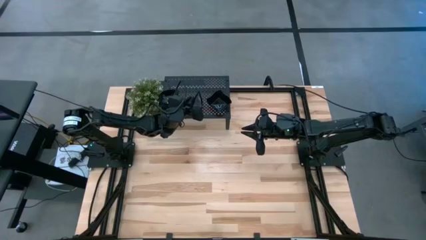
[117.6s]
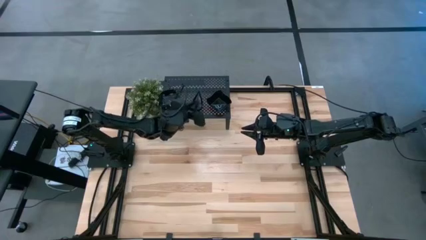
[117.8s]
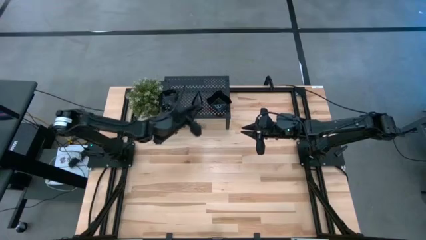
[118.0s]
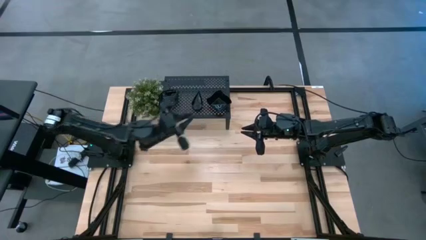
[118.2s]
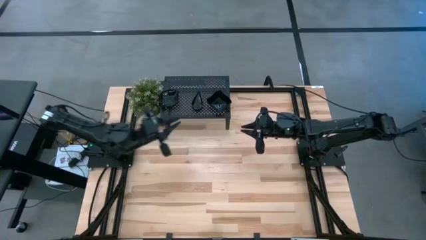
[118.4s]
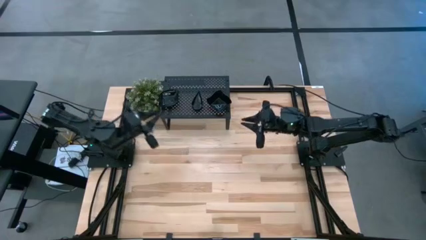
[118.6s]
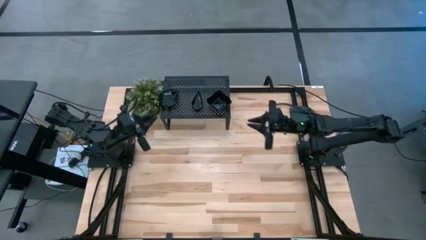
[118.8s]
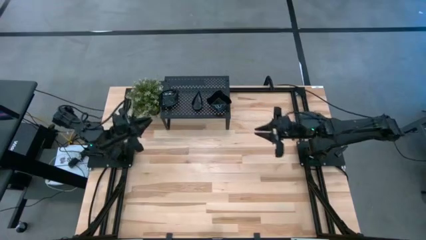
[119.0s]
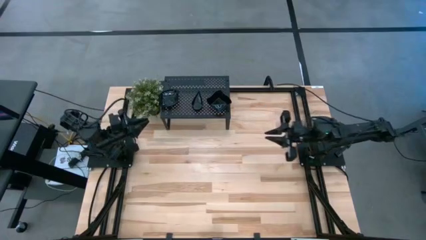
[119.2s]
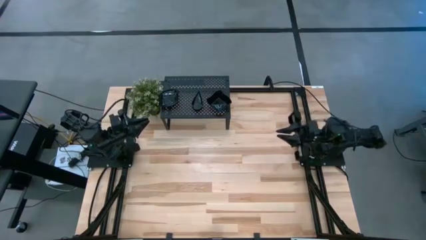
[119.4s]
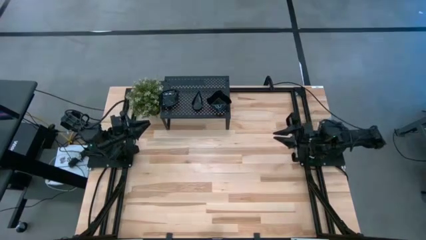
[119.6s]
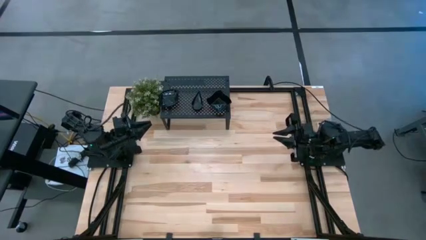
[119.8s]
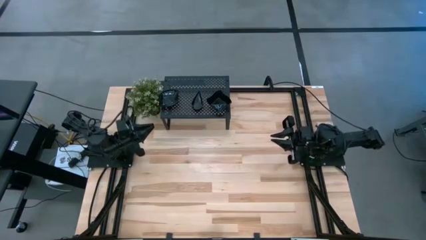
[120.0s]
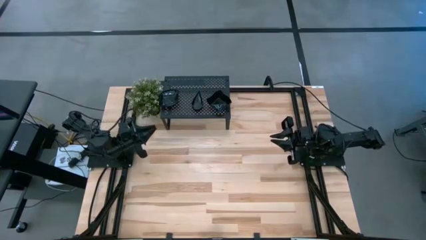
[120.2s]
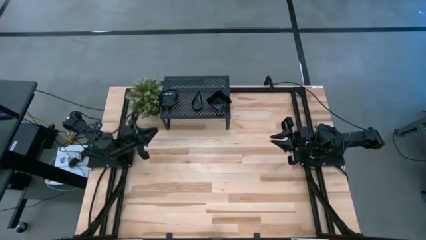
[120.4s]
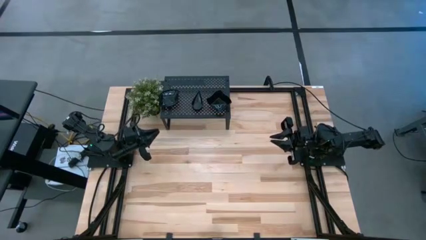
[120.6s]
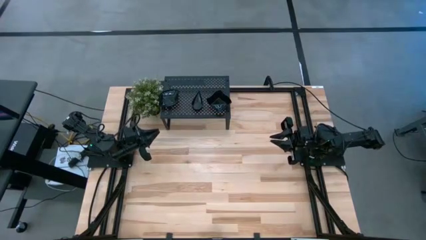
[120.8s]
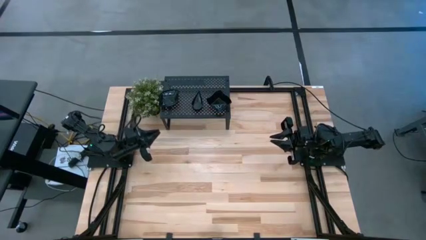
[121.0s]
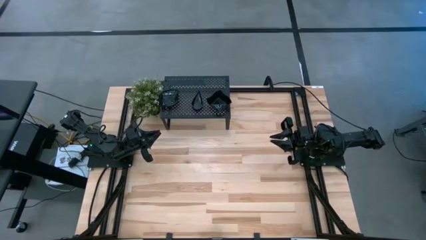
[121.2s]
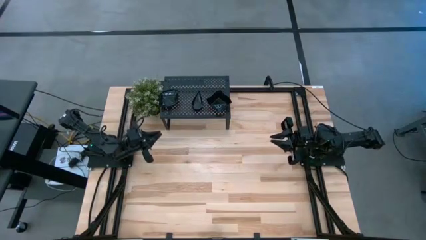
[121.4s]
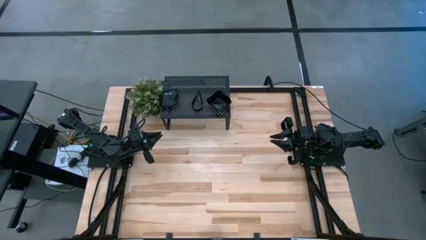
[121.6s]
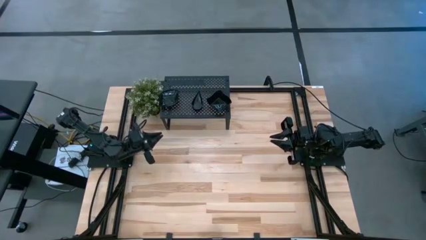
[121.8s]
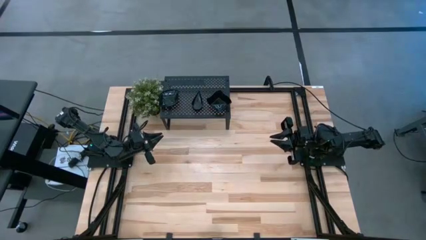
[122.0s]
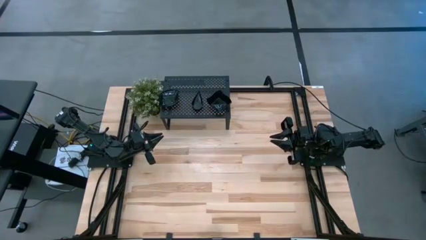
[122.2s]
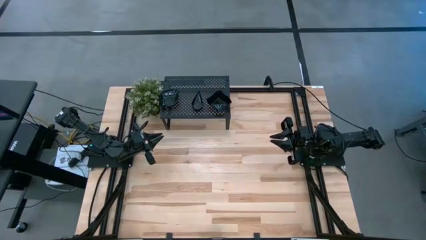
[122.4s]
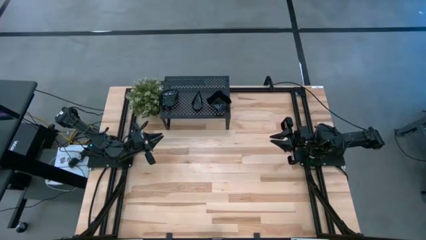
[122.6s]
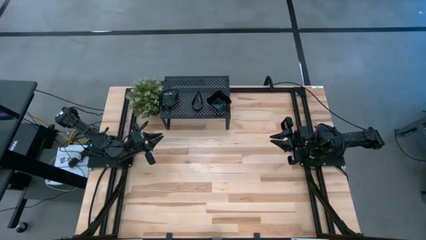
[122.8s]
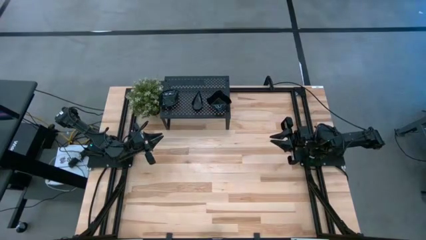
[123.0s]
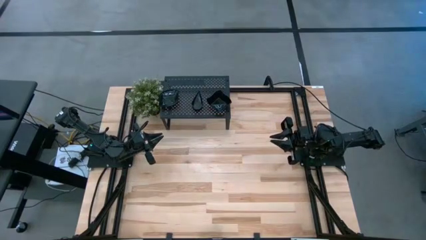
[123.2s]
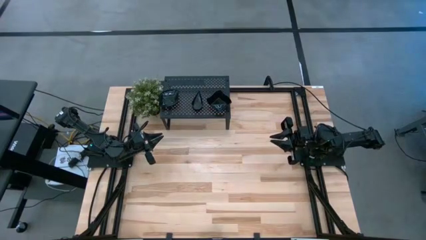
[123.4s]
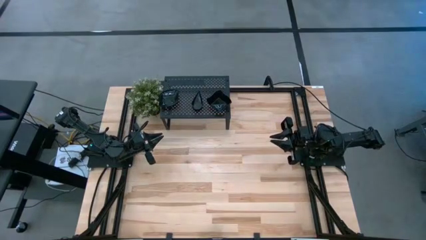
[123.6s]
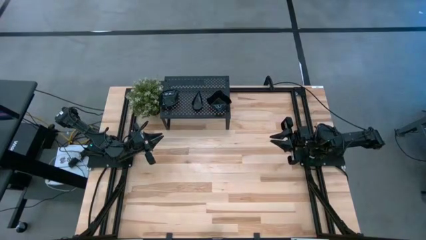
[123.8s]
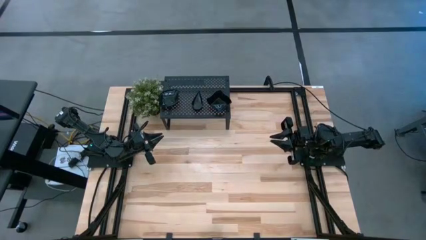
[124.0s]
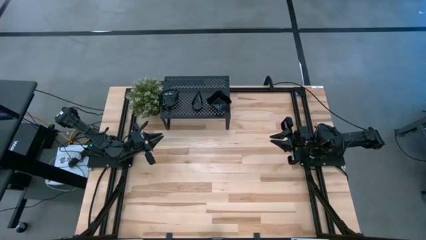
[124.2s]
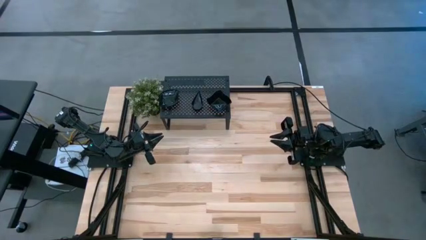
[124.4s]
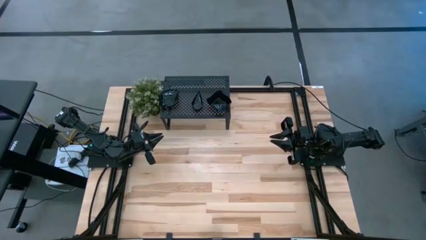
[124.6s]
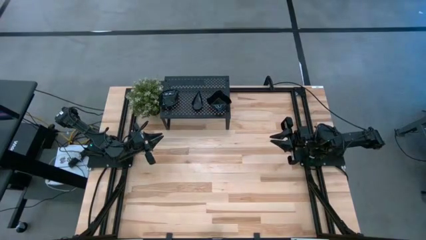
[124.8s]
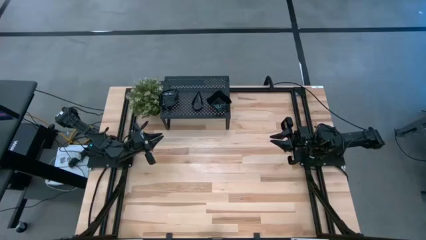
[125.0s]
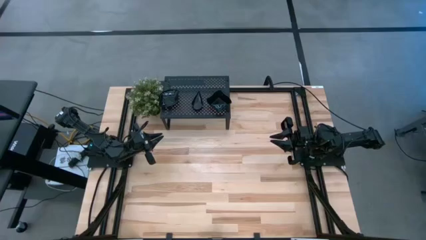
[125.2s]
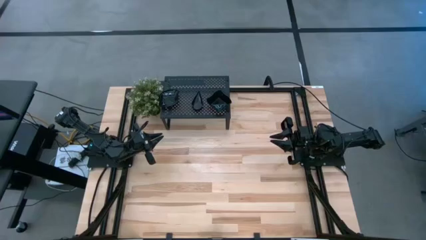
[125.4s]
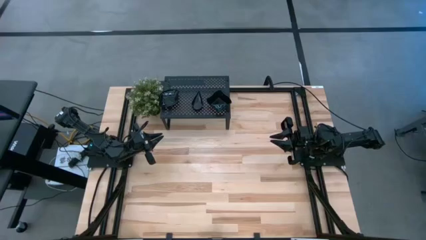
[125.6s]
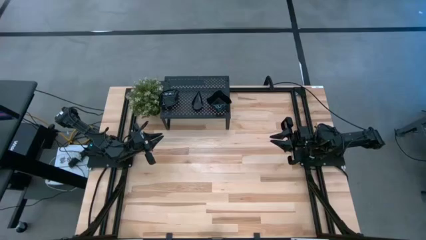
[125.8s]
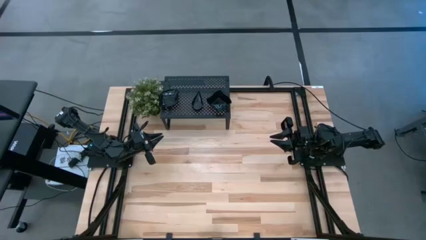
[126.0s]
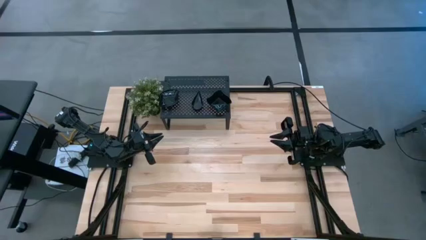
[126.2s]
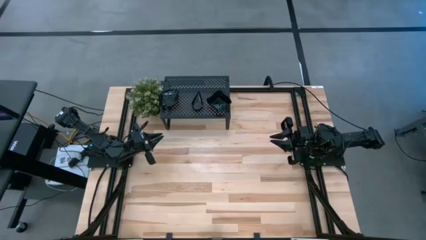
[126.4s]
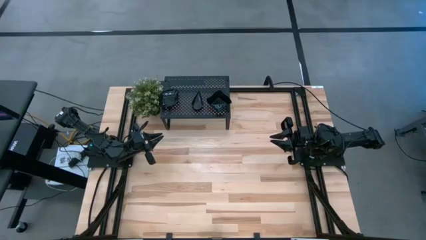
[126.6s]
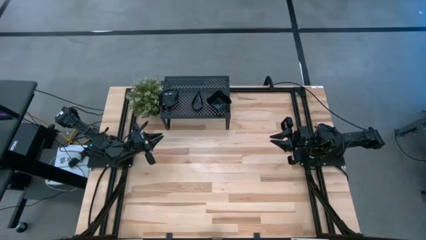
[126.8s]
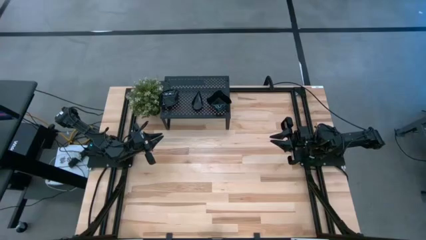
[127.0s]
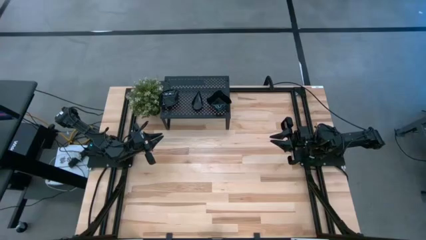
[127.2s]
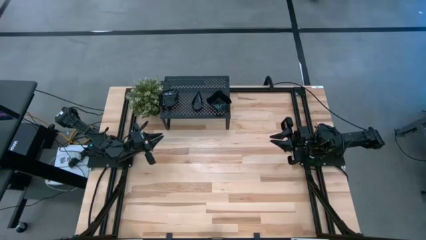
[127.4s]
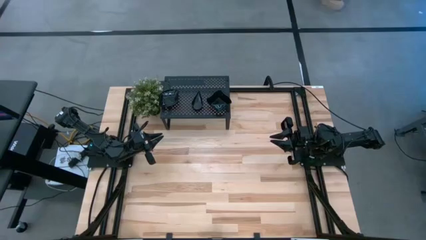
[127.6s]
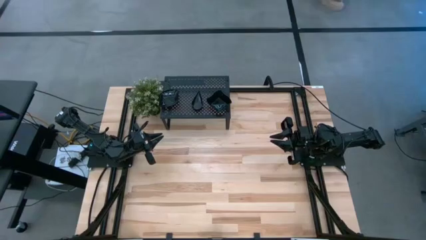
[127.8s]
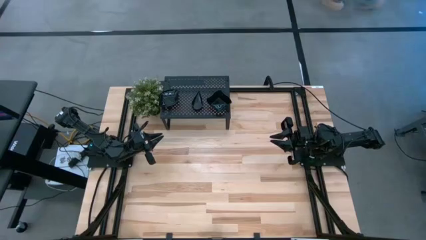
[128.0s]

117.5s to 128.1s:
Task: Pick & Place Mini shaped plates
Return to Home Position

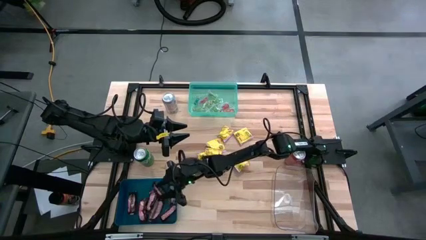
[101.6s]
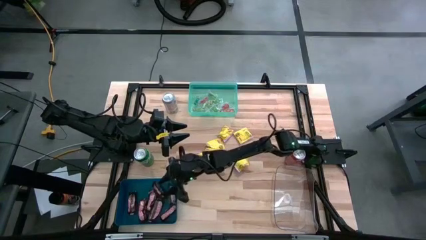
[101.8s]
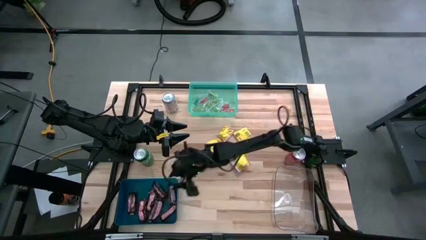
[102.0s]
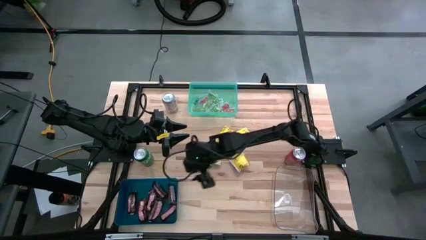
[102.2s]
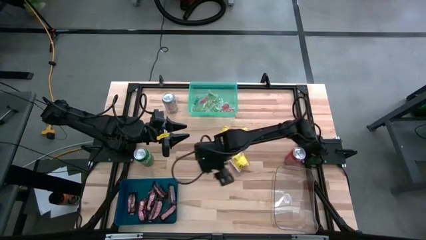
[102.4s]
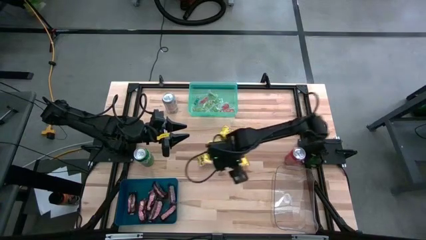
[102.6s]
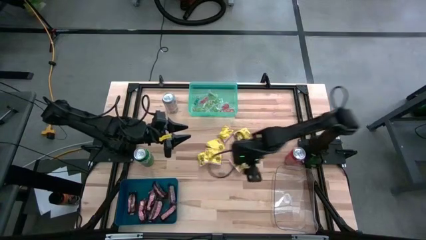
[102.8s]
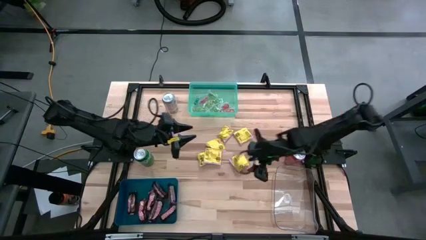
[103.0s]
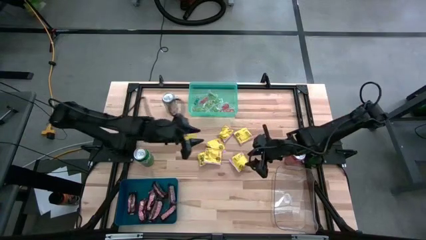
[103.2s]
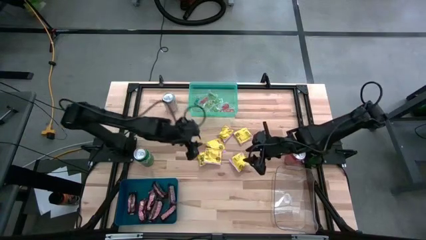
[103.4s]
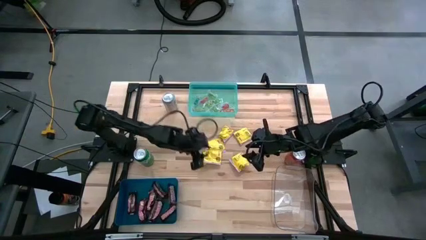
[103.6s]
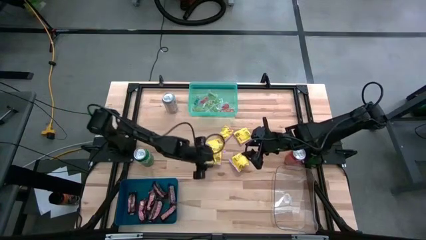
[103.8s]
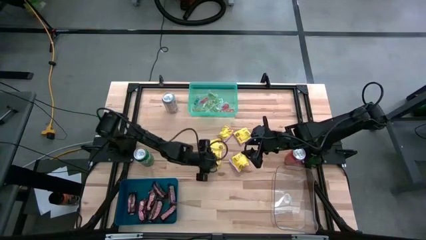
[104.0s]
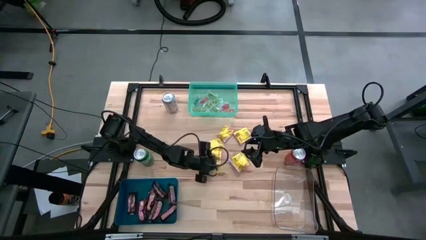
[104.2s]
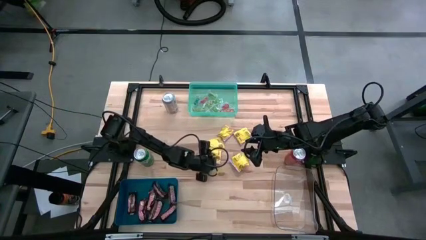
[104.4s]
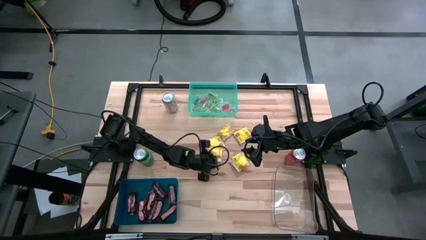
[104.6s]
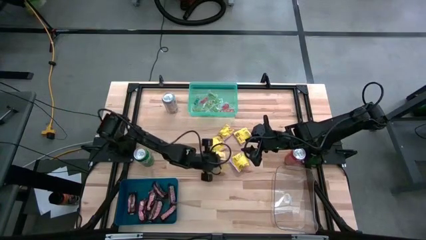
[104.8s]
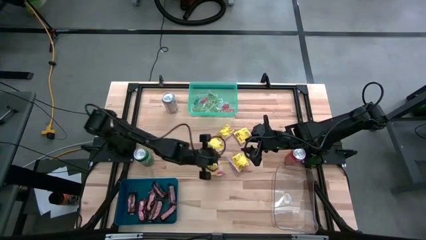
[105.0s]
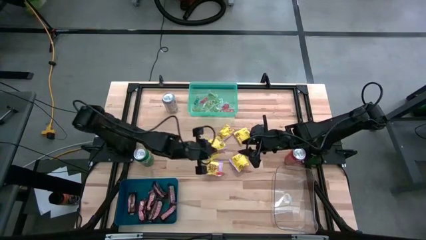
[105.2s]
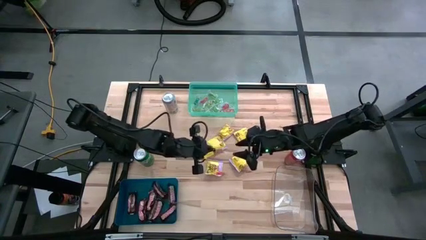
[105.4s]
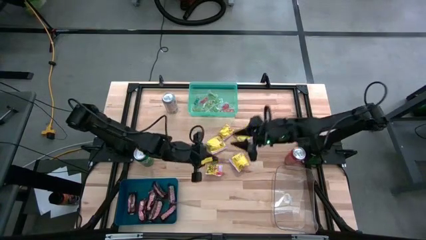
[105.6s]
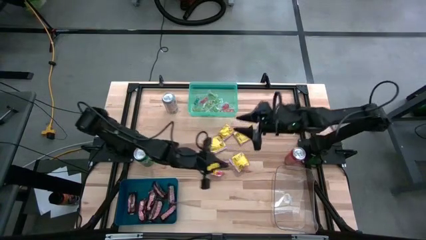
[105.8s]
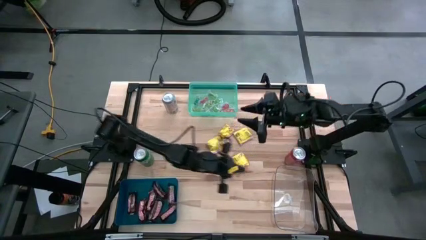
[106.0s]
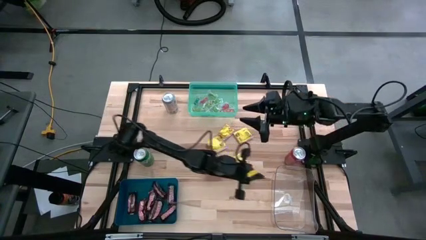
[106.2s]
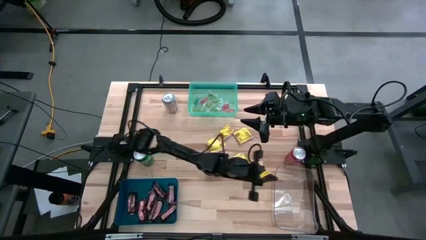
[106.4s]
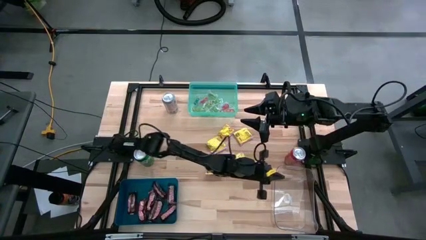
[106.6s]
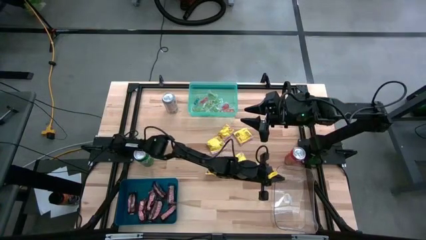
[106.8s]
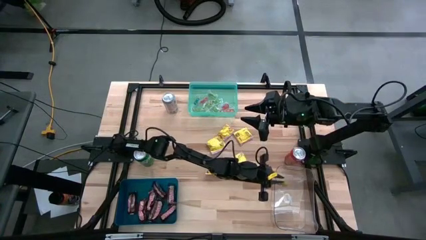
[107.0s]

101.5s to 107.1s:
Task: Sort candy
Put the yellow candy into the transparent bin
